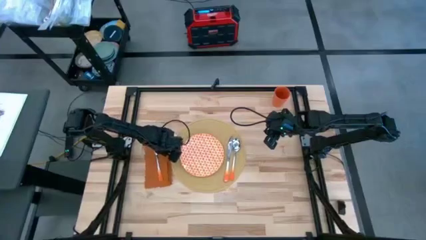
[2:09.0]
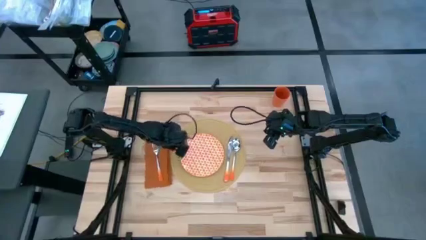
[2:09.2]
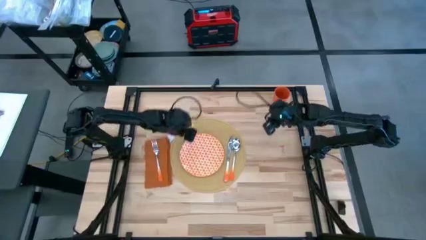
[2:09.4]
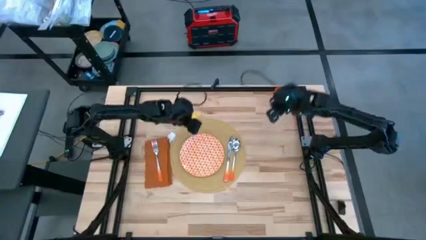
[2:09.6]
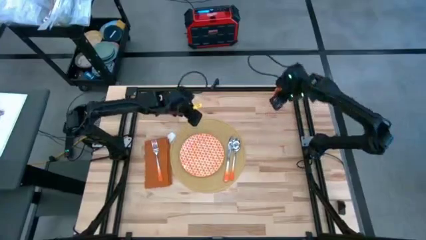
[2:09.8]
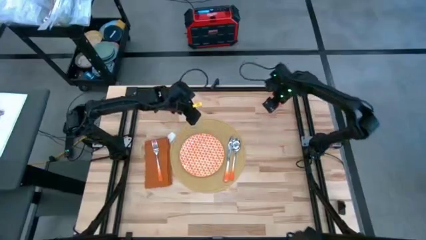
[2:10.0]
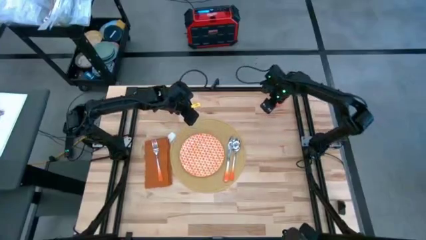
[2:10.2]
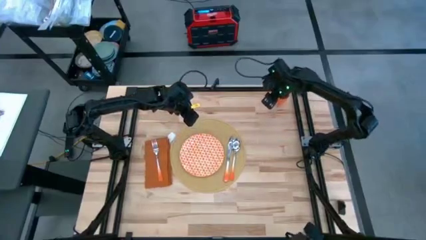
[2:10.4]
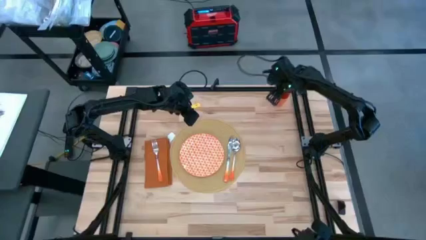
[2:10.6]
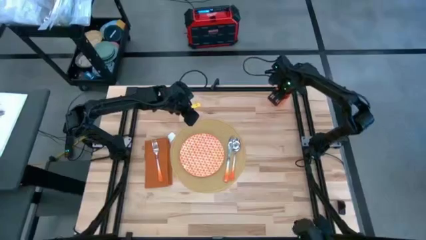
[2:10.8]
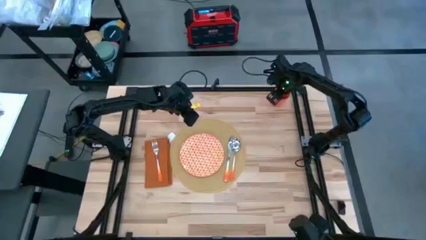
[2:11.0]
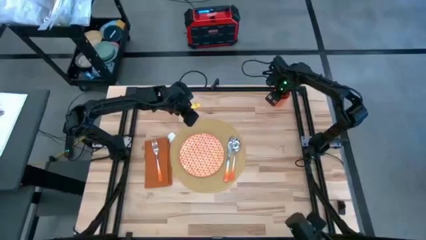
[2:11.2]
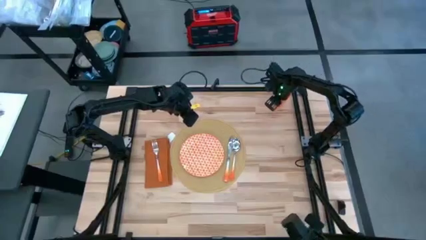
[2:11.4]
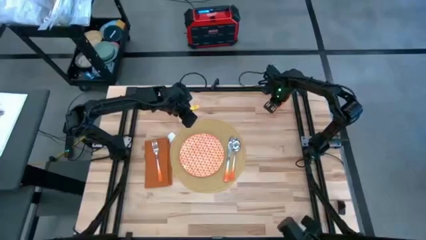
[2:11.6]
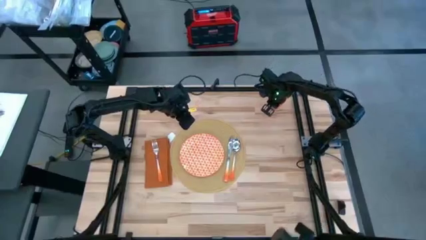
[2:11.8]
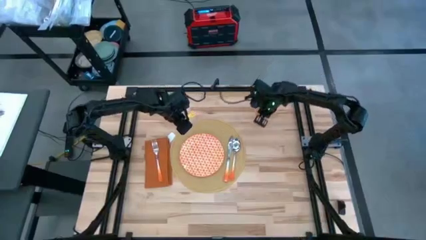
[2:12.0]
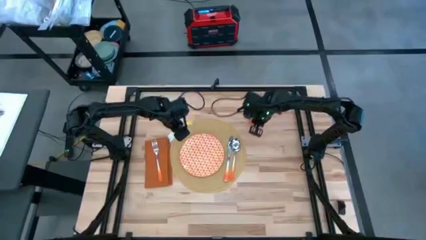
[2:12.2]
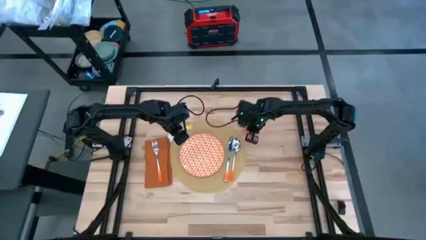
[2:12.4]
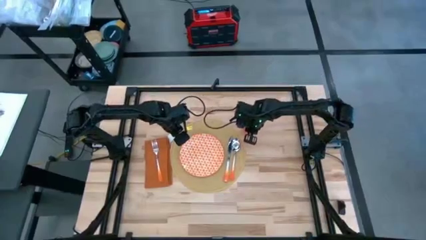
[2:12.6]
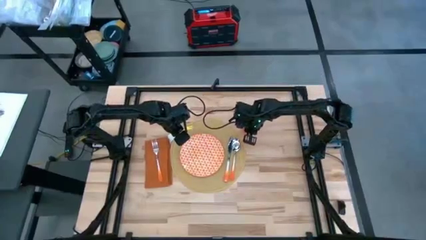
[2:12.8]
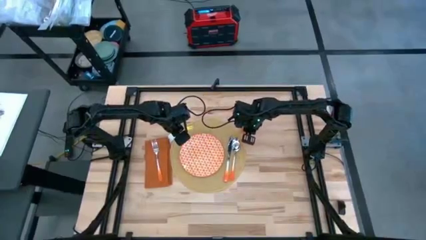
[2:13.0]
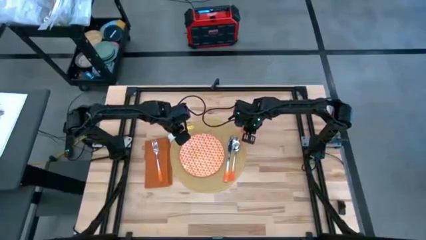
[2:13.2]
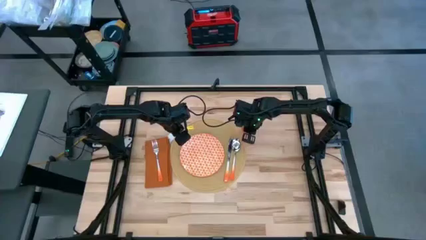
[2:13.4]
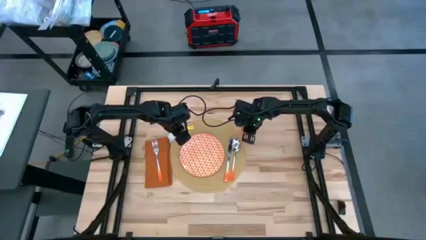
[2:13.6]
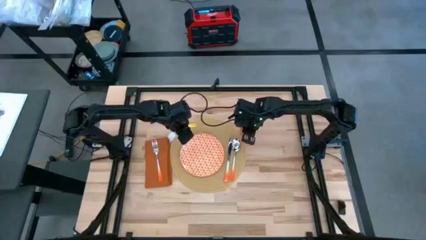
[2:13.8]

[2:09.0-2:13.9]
Task: Set table place
Move the orange cup to the top right of the placemat

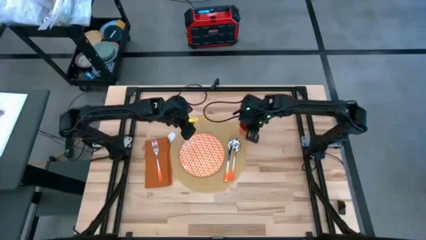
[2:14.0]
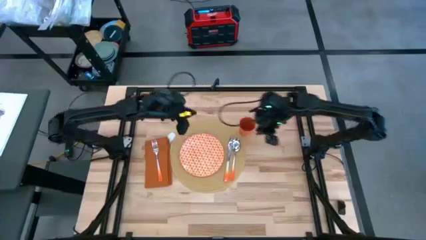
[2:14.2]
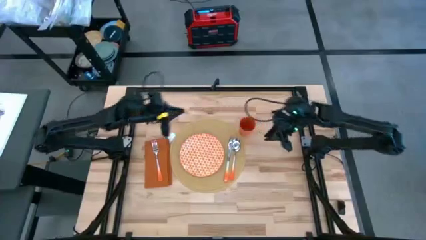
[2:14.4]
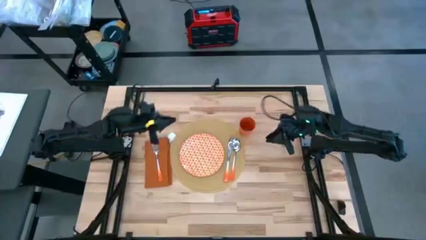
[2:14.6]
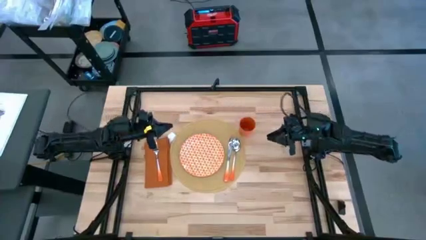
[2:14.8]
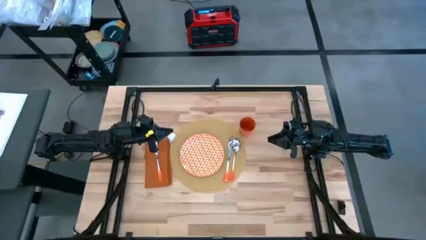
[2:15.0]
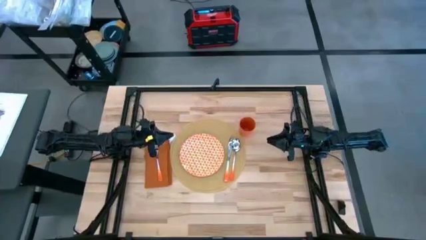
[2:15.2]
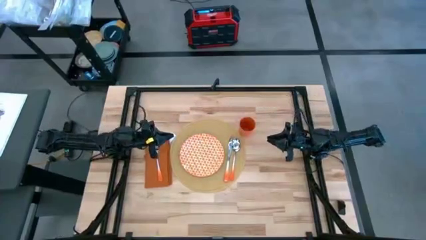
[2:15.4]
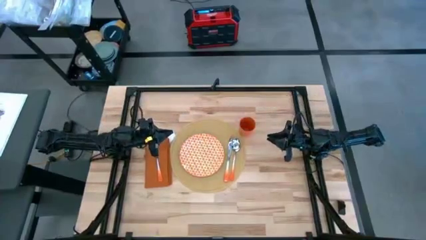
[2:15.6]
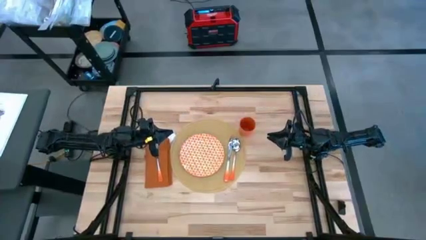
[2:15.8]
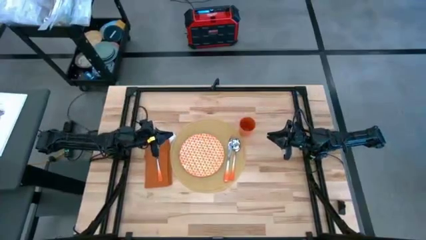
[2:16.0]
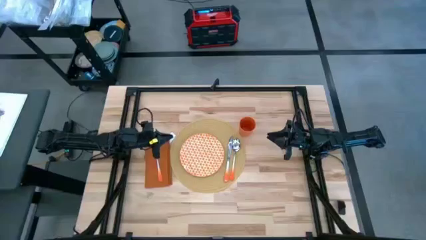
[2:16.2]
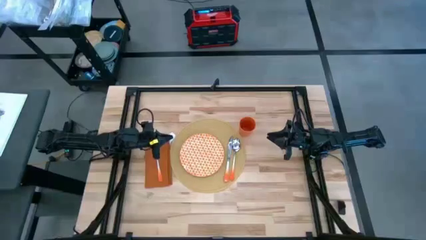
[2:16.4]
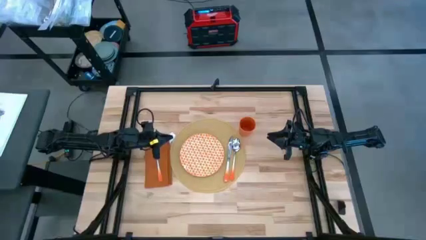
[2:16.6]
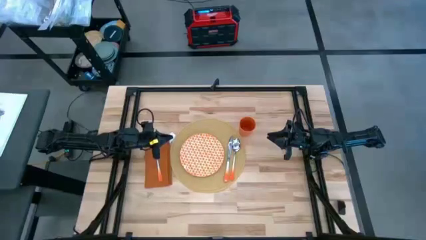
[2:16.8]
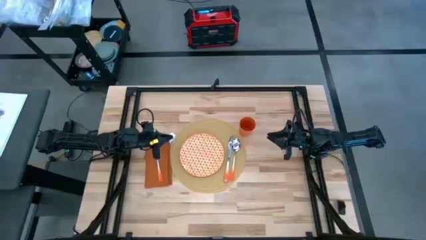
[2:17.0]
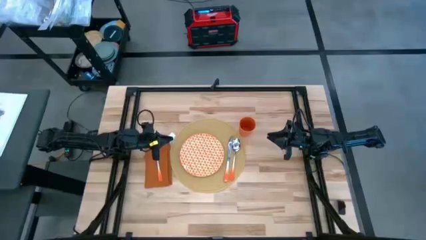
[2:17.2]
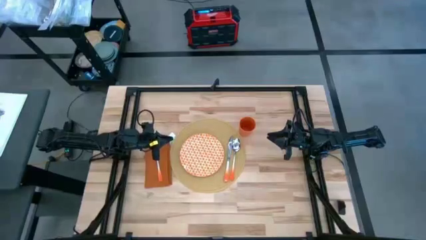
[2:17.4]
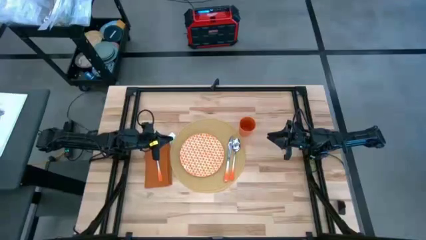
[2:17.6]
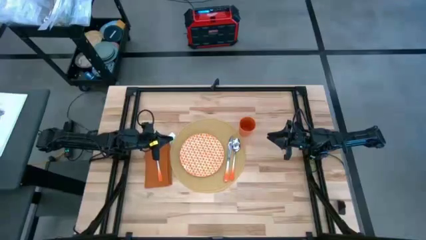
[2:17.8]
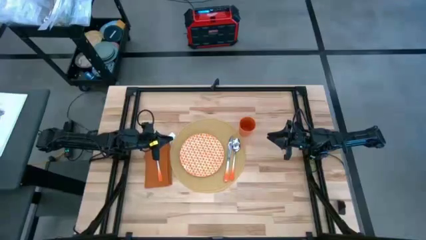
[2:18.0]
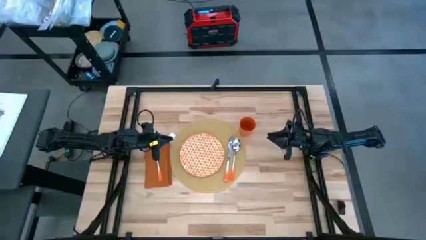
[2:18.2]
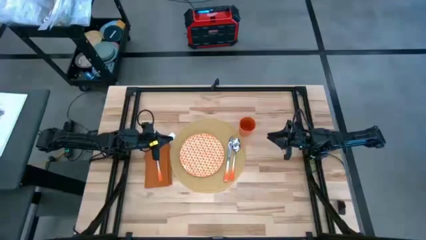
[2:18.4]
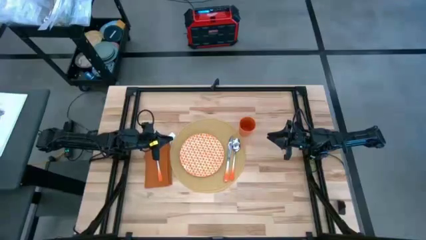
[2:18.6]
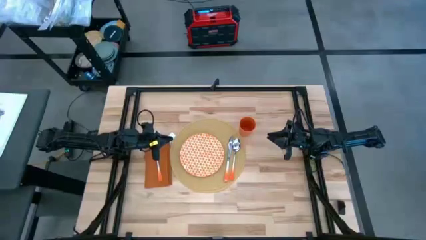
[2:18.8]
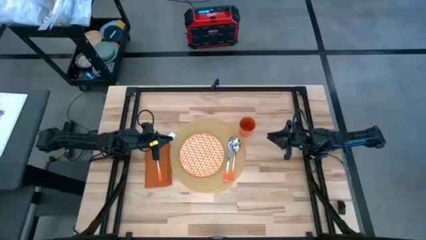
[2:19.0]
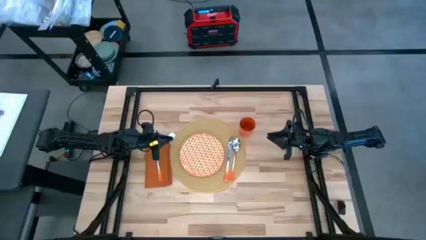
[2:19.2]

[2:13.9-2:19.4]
Return to Home Position

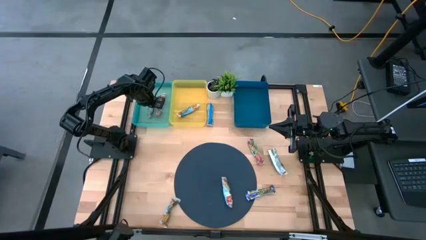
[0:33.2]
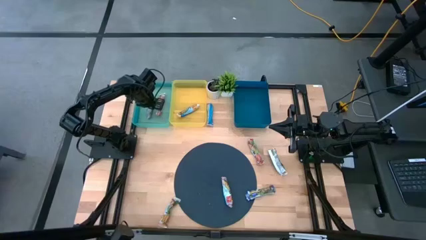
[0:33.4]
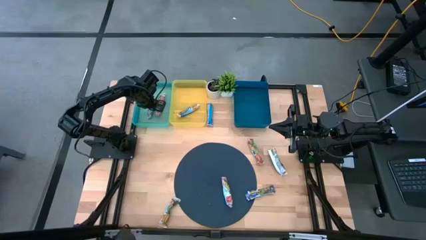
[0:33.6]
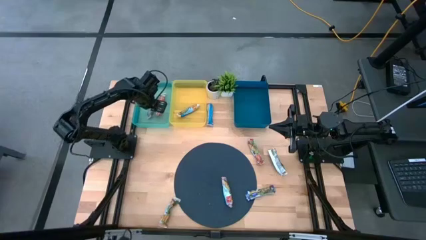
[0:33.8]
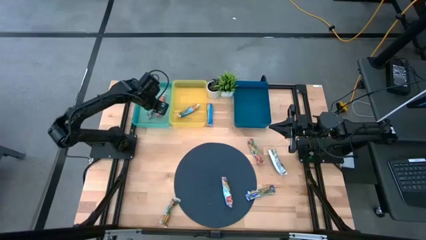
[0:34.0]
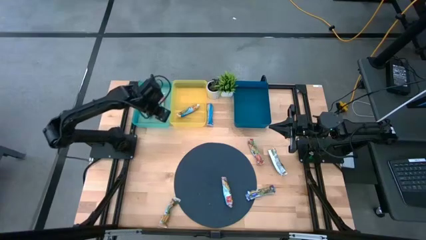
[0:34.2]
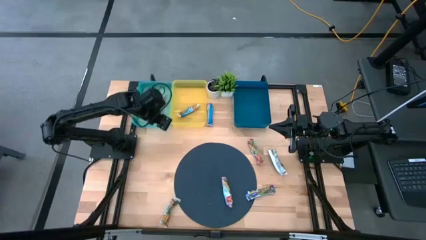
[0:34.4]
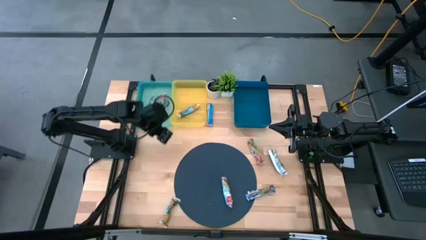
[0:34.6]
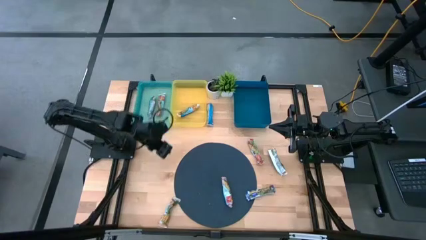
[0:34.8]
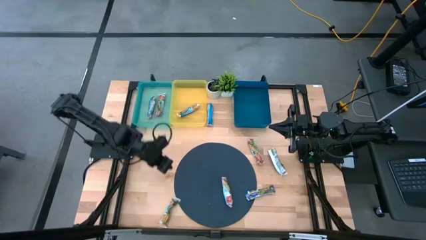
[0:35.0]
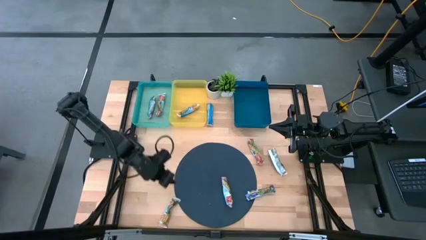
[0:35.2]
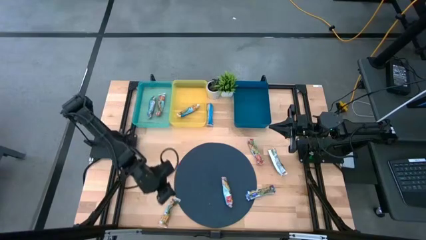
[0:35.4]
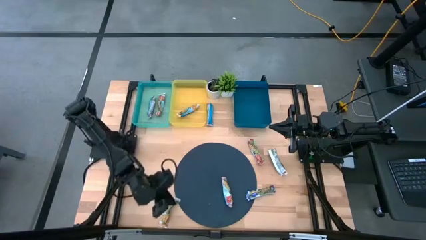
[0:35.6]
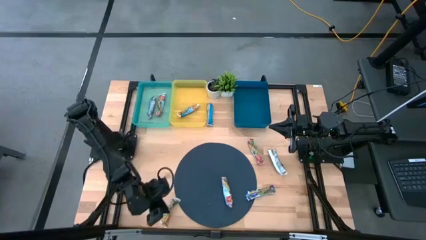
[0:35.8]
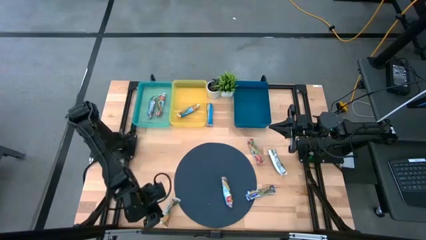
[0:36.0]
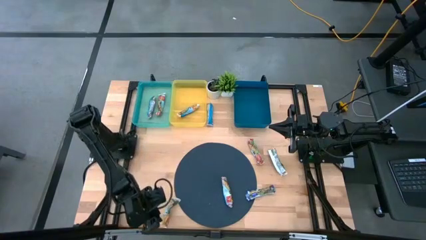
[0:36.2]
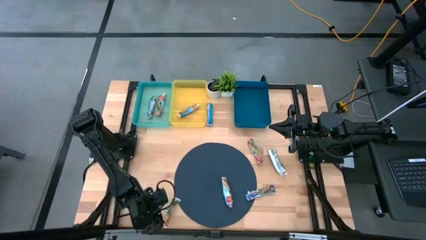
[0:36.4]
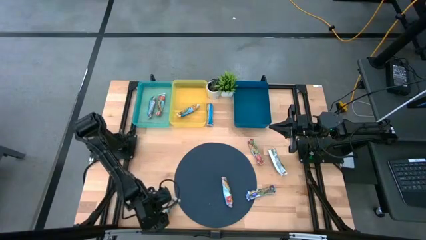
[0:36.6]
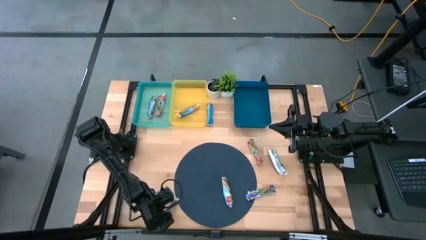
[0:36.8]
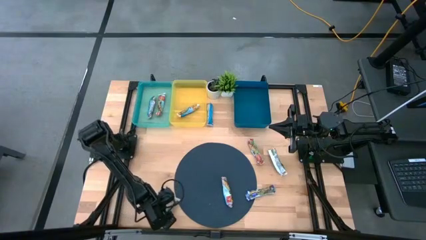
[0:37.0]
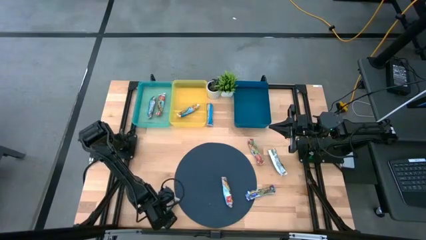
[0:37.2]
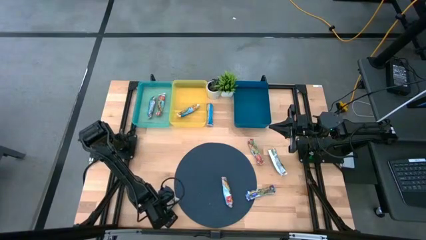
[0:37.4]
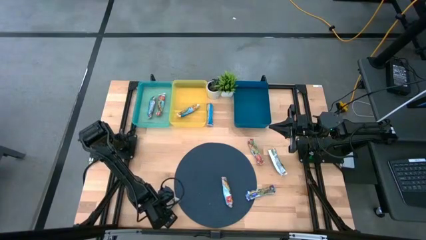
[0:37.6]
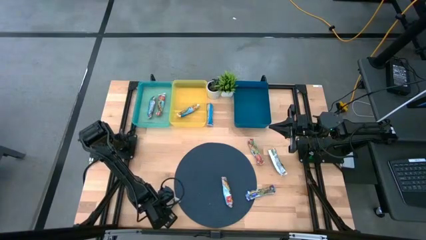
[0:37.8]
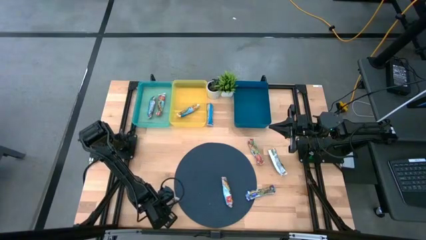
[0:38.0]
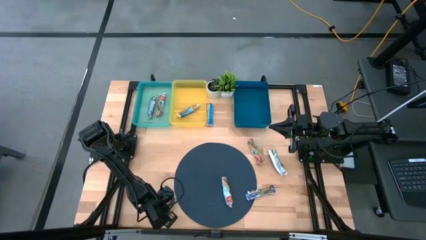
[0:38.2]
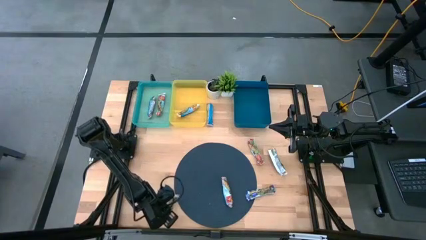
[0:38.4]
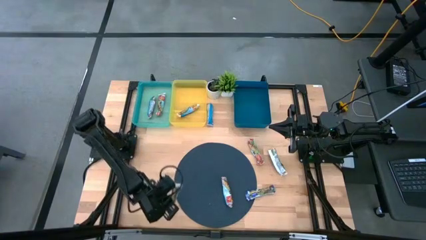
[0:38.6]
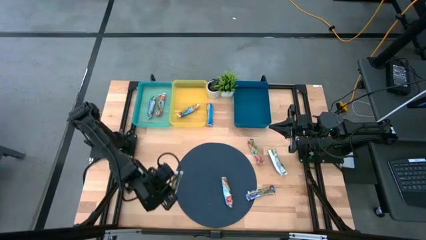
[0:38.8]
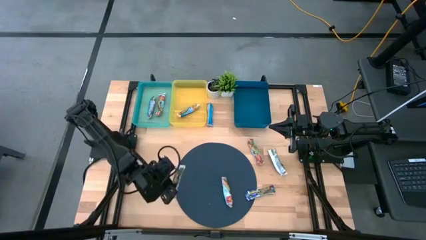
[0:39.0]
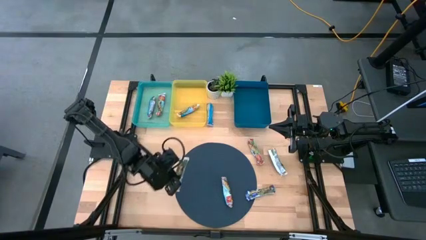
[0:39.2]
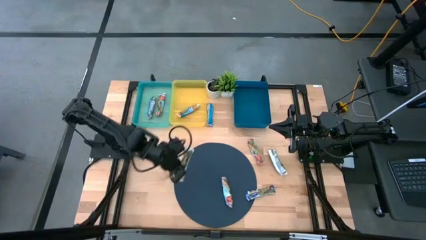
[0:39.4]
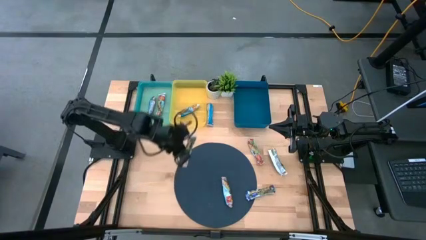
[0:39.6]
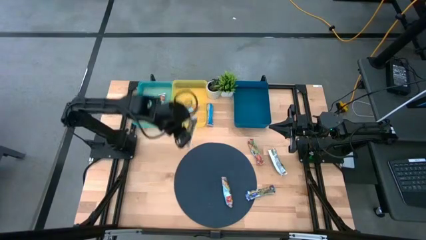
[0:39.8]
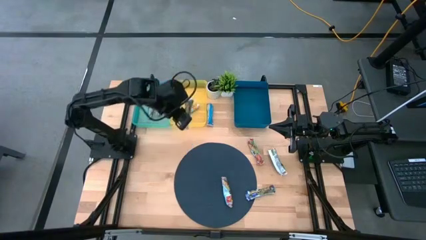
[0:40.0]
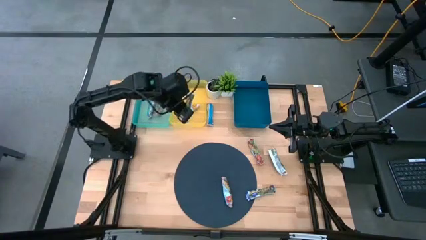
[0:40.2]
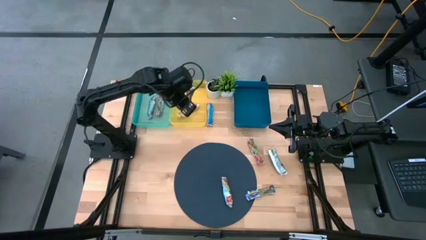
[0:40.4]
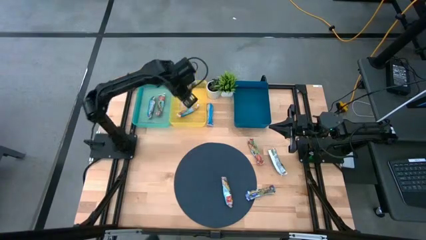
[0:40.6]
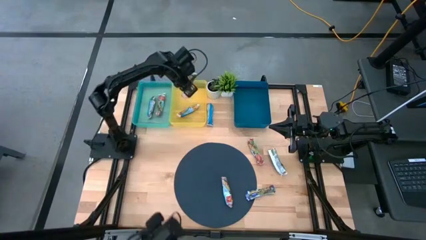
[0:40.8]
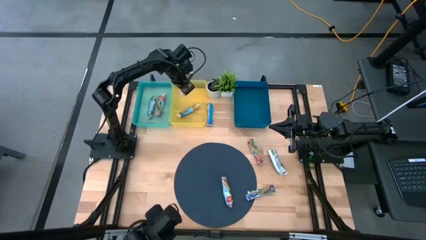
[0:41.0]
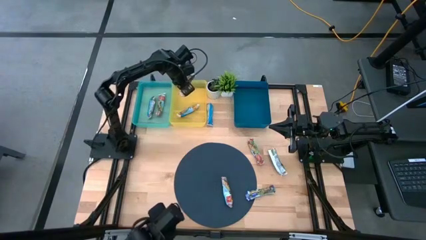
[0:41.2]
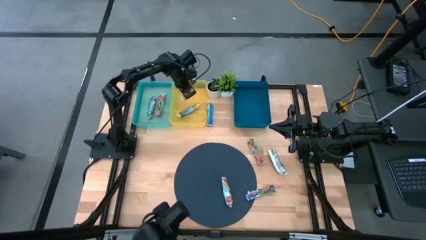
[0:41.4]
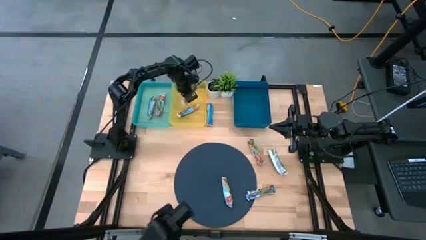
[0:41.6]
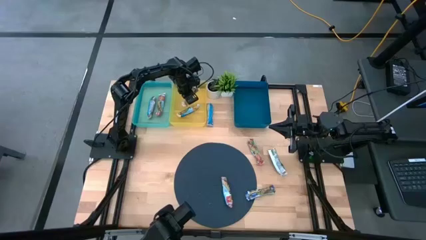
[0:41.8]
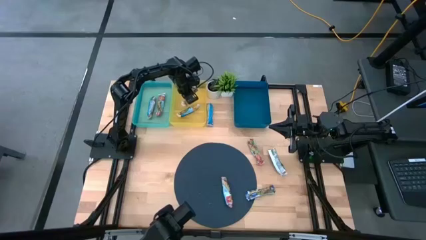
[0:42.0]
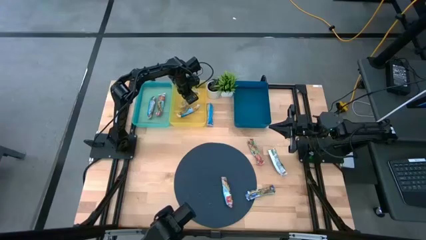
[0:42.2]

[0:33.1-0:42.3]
Task: Pick and place Granola Bars by type
Put the green granola bar into the yellow bin
